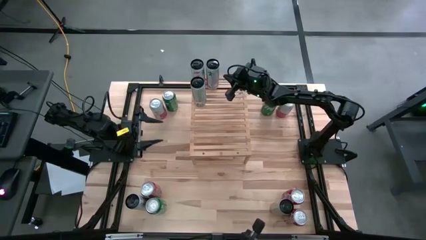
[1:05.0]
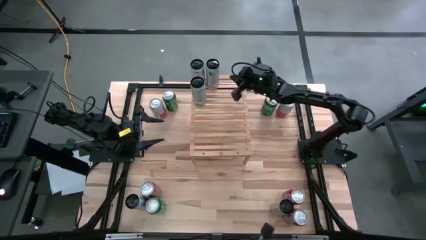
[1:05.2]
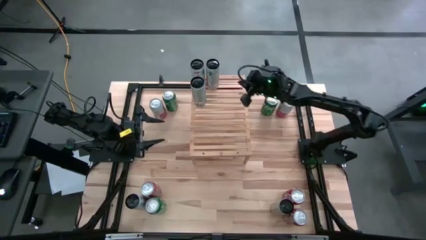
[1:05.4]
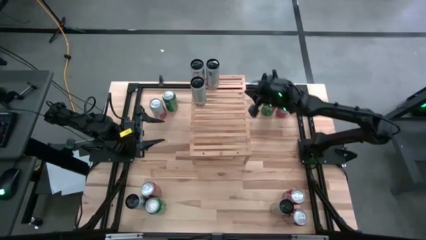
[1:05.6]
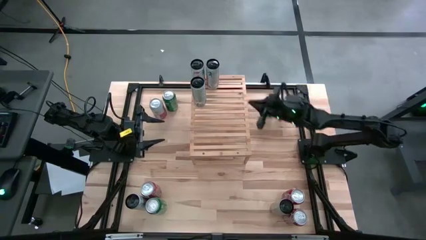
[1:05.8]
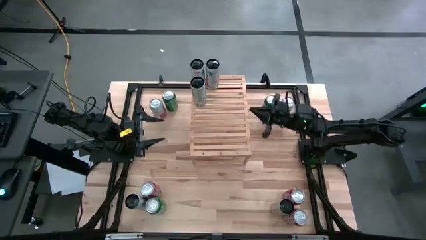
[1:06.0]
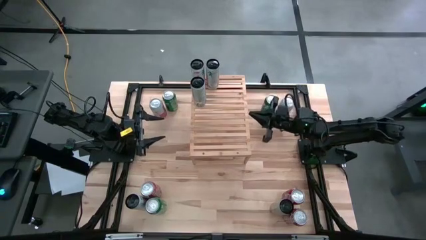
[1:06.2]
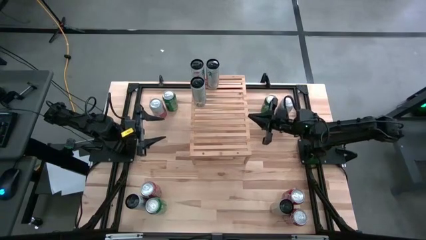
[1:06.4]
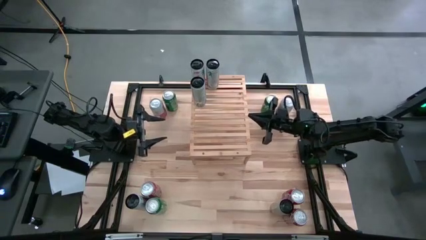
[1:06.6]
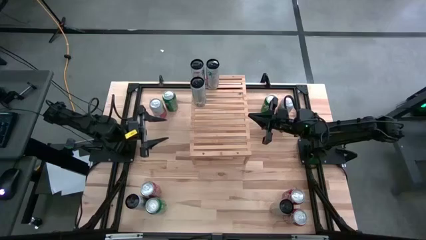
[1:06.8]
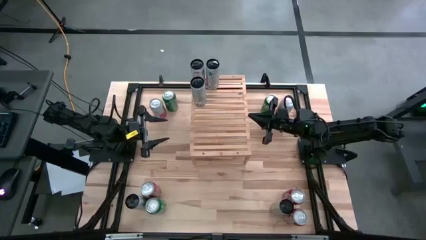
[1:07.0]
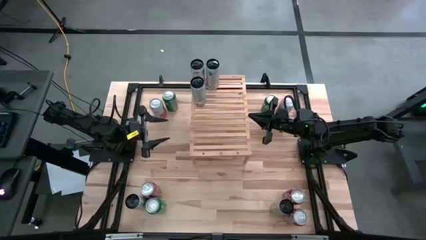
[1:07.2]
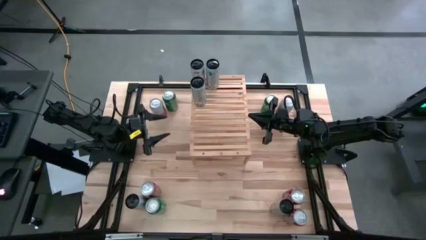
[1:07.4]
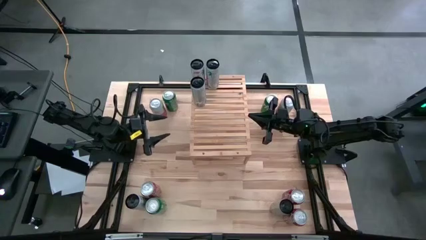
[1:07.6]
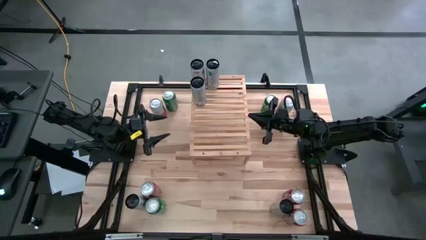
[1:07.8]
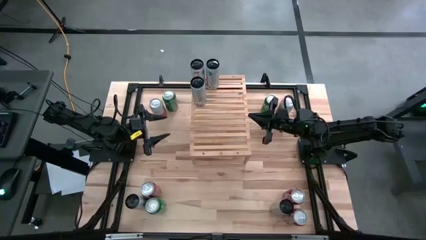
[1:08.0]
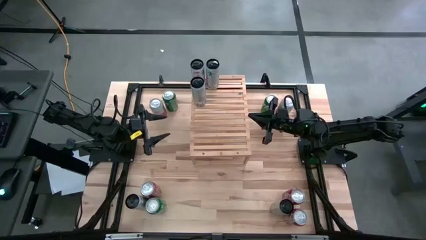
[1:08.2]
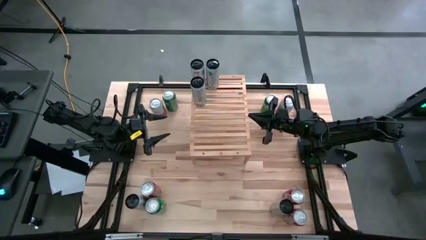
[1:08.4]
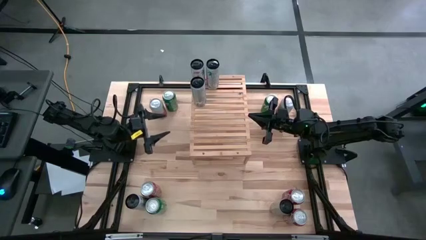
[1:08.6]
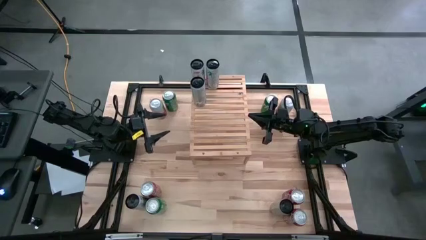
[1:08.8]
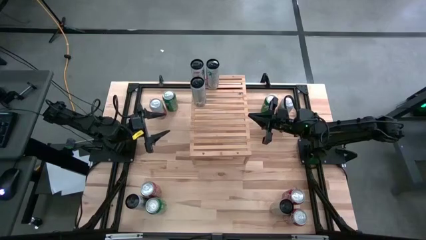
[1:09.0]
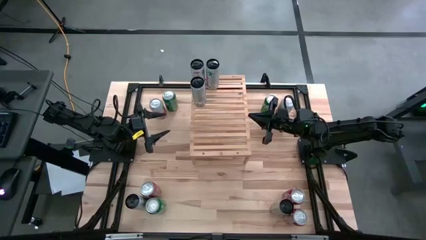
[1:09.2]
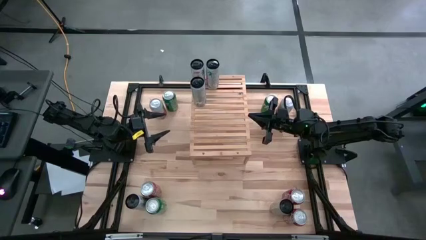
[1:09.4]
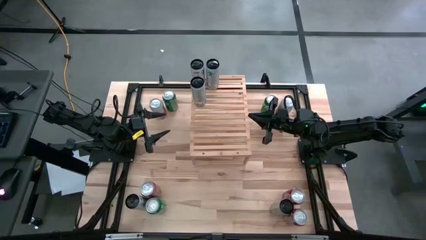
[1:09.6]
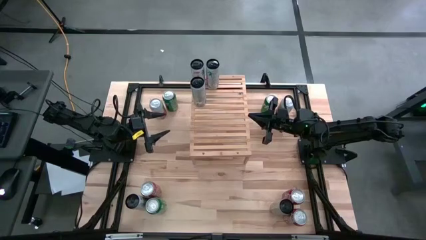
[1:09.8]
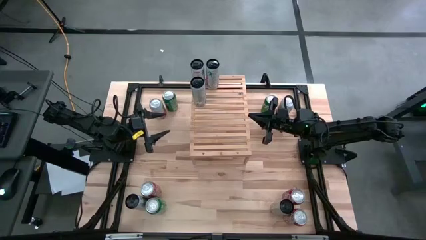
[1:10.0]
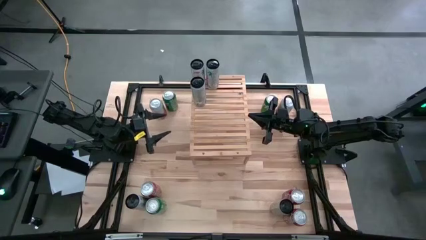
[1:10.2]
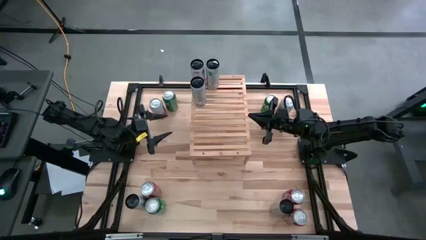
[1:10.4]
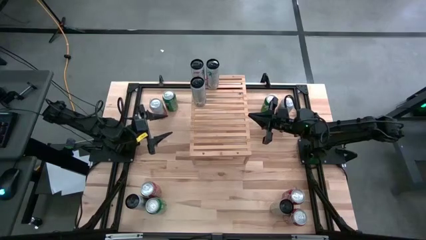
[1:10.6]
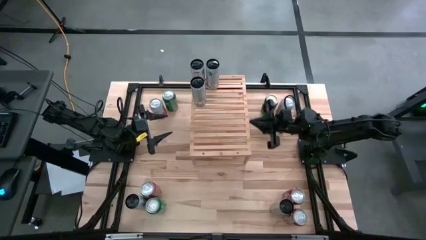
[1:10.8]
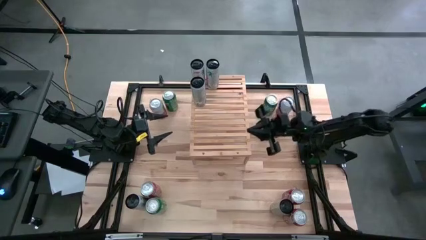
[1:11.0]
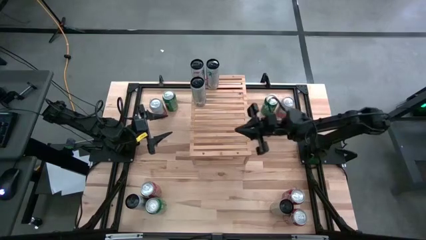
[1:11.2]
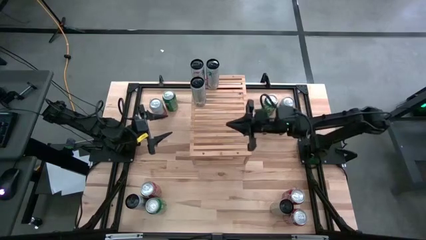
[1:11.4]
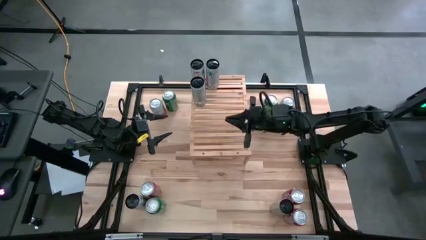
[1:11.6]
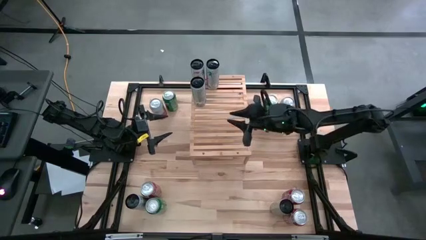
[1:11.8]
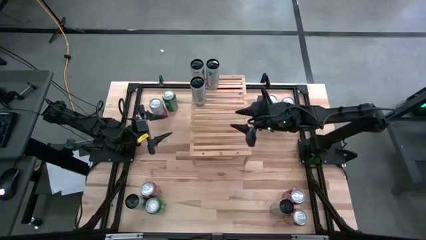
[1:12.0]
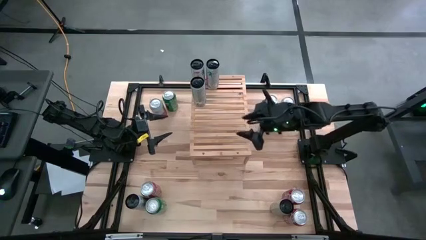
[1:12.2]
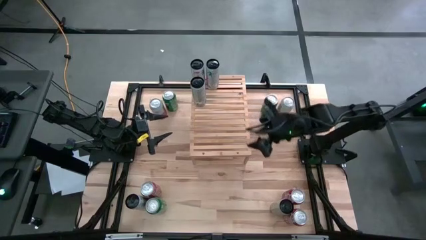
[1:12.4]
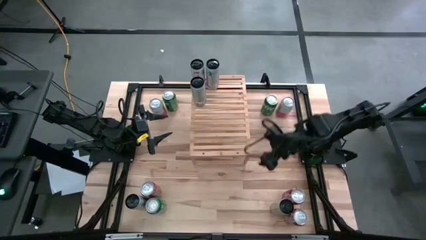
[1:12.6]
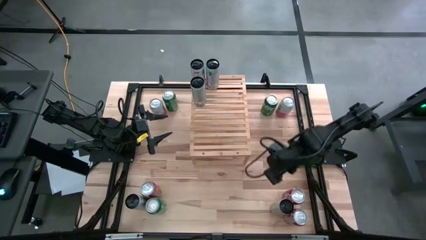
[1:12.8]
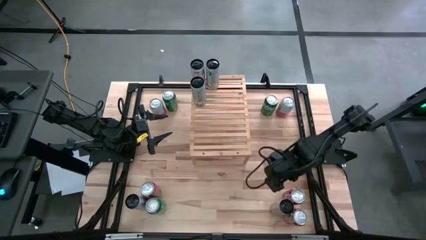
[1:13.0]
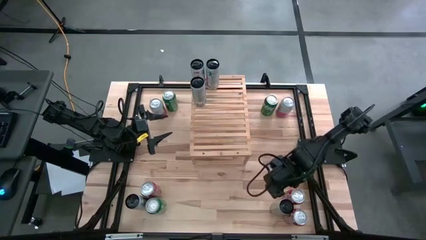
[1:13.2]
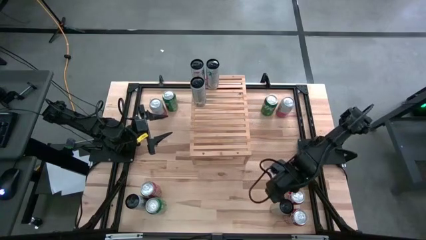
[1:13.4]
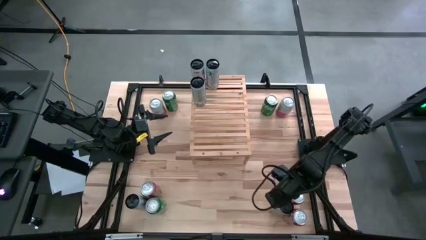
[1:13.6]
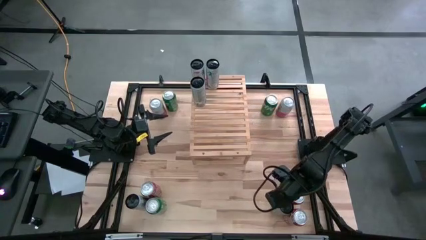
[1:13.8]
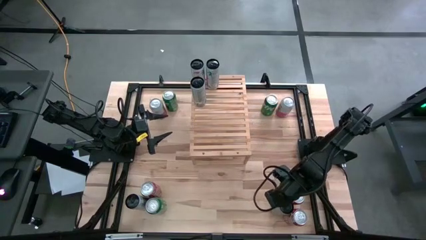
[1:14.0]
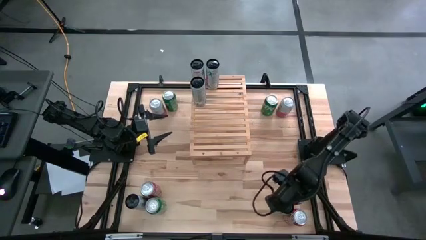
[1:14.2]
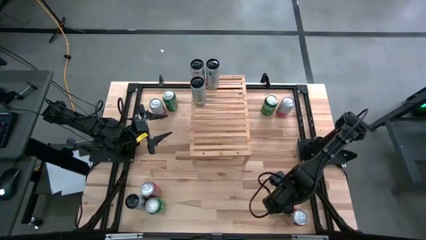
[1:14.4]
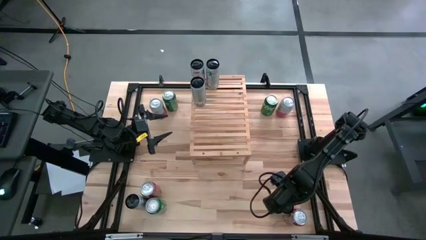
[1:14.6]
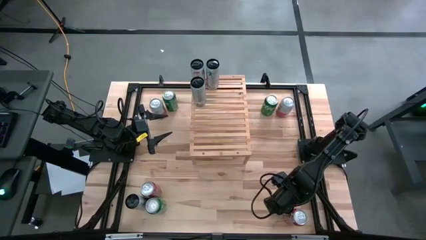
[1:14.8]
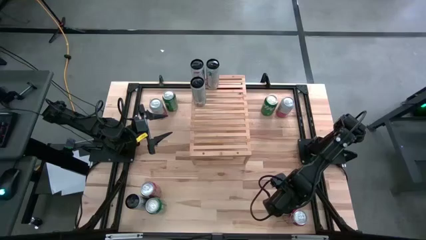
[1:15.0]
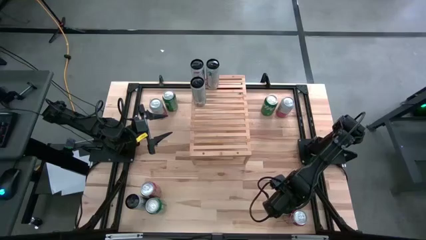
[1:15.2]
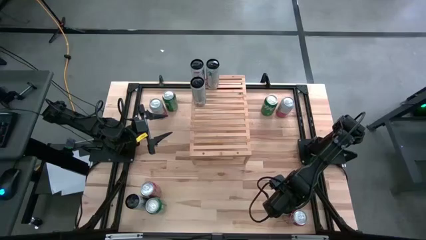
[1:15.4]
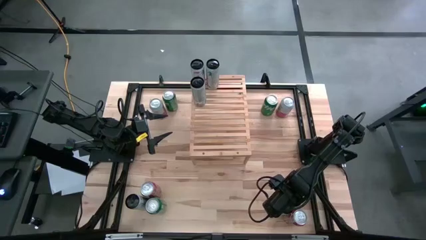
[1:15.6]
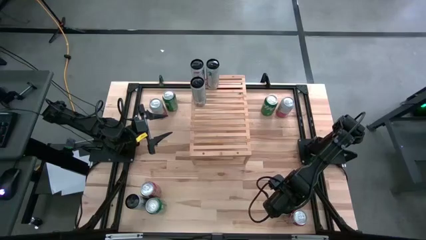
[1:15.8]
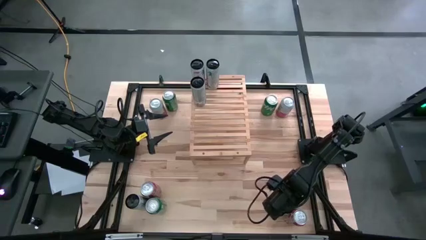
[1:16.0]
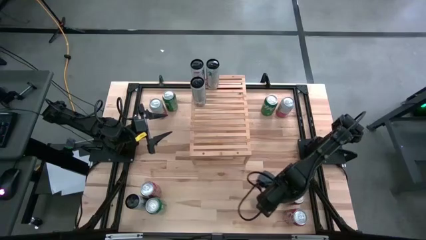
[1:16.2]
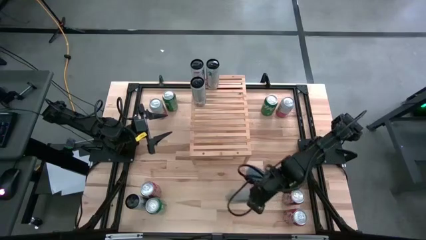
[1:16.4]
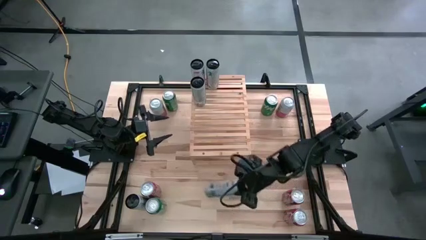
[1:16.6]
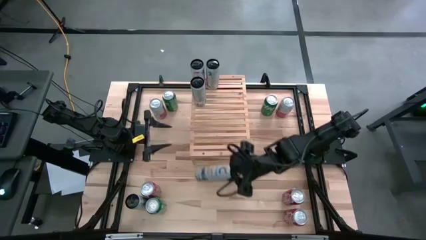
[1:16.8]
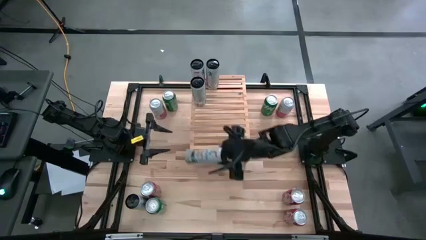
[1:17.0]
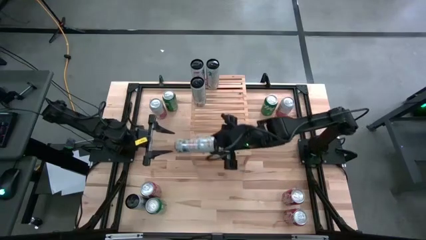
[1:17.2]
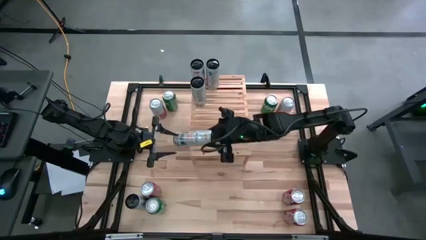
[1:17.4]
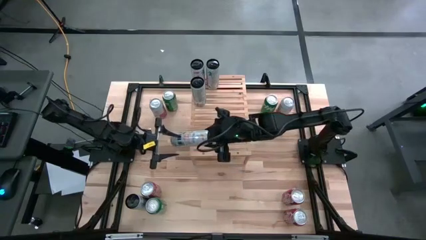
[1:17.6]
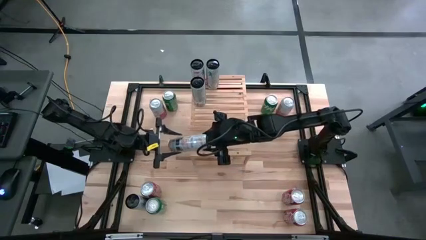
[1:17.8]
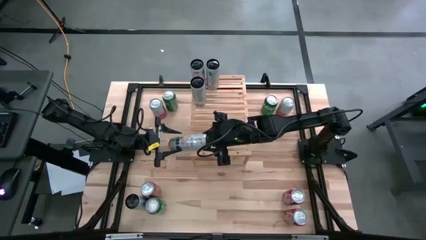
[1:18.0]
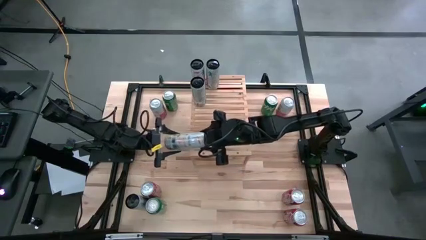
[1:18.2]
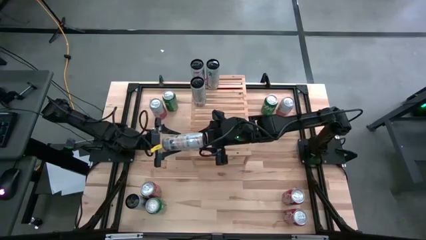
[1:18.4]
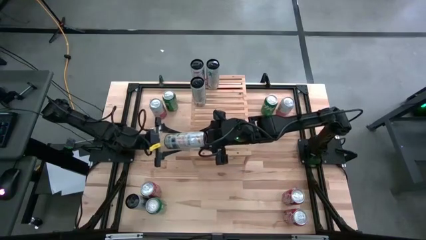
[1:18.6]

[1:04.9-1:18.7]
Task: Place canned beverage on shelf
Put the white yellow soda can aligned with the other white yellow soda can on the shelf

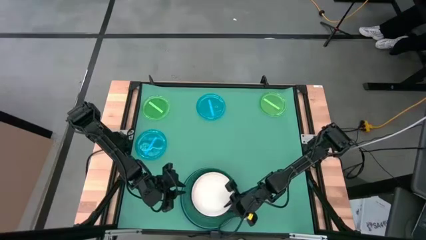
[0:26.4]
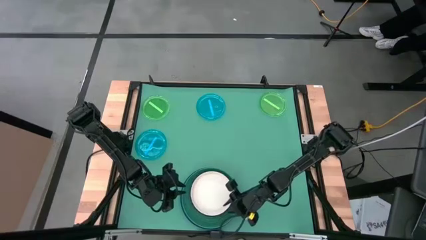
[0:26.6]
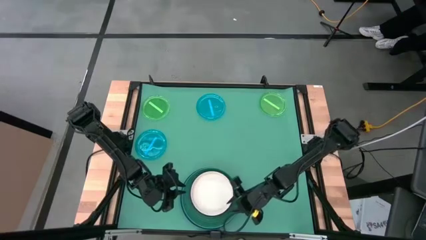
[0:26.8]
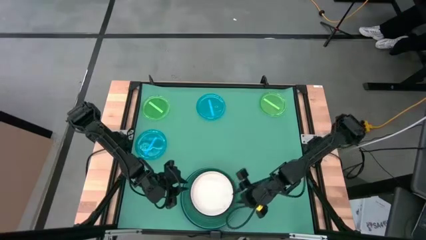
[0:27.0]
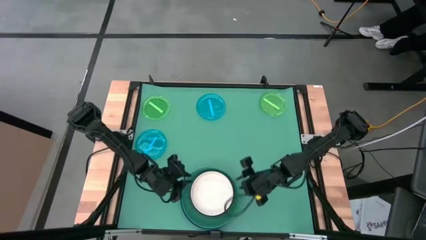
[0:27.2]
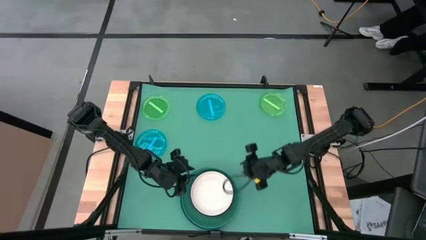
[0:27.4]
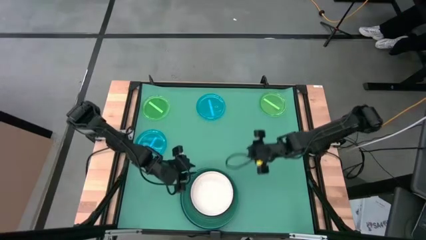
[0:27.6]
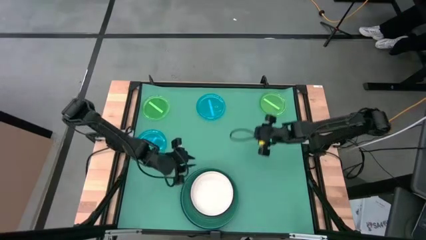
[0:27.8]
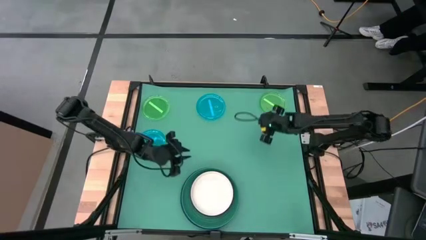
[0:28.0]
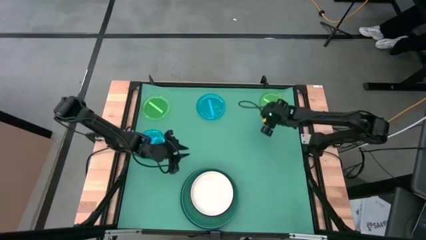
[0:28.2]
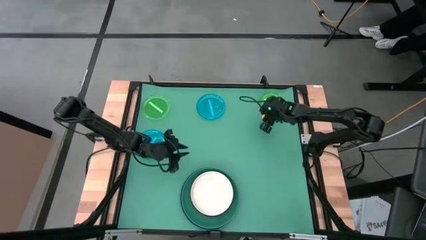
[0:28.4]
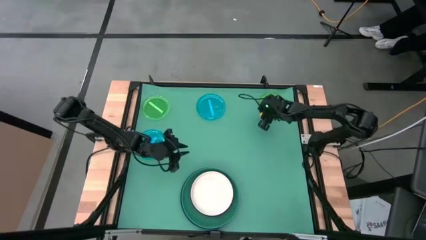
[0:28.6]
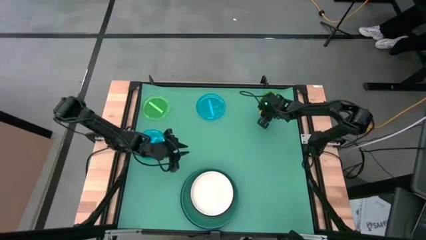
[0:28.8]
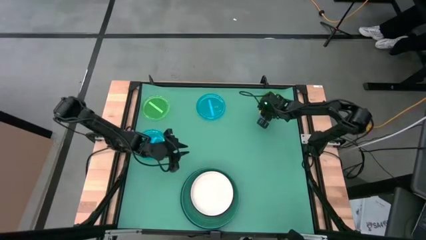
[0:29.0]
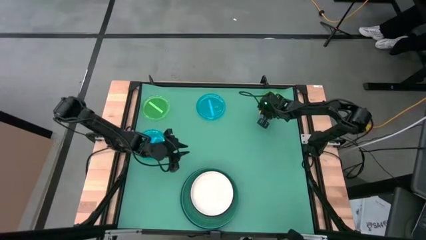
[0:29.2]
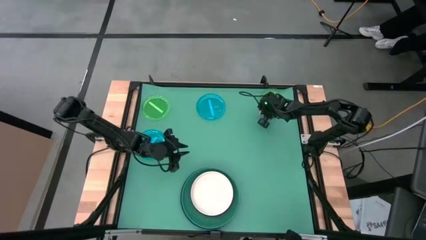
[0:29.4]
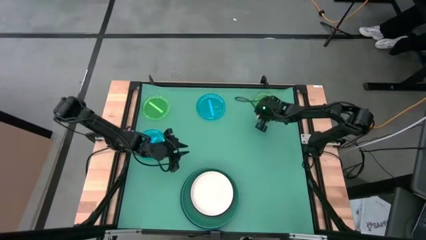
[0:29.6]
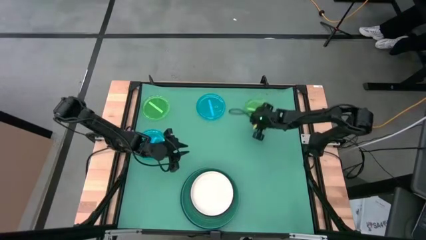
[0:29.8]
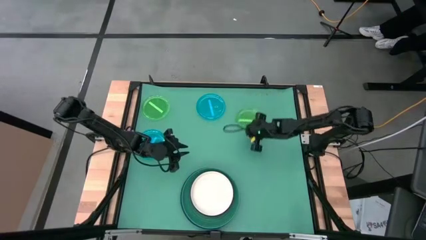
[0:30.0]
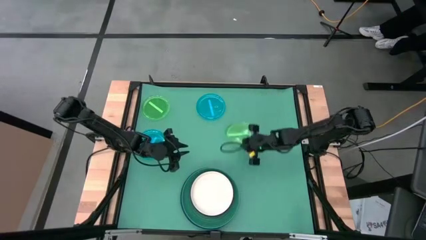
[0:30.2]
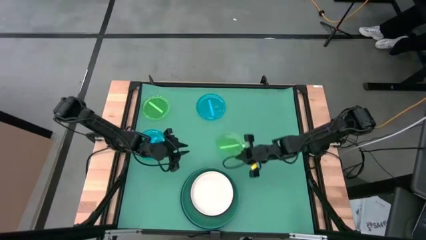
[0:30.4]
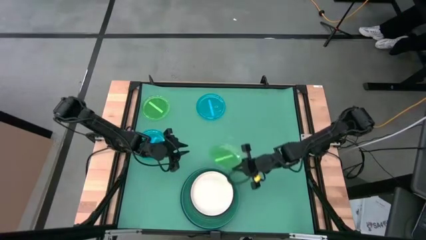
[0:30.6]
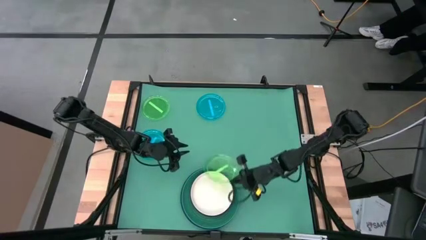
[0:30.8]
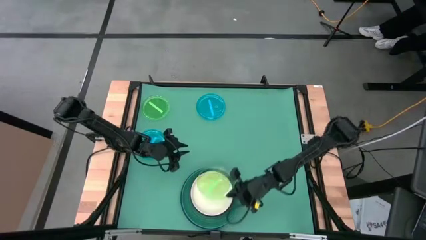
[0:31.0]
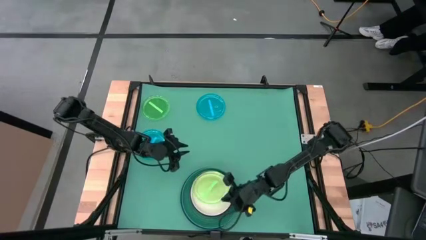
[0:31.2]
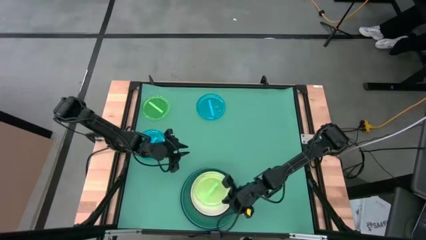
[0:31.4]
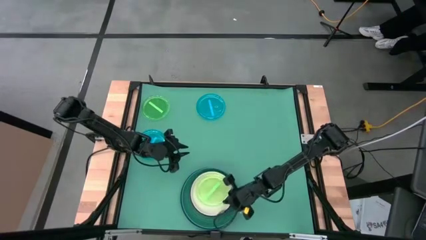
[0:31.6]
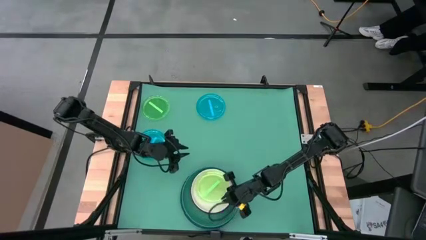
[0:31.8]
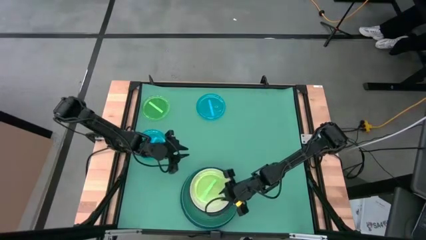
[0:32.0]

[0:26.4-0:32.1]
Task: Stack plastic plates
Stack the right green plate on top of the white plate
